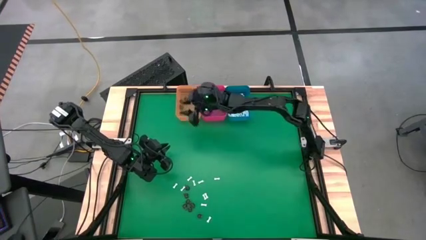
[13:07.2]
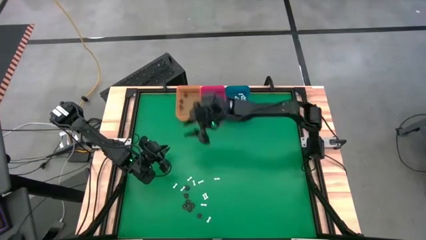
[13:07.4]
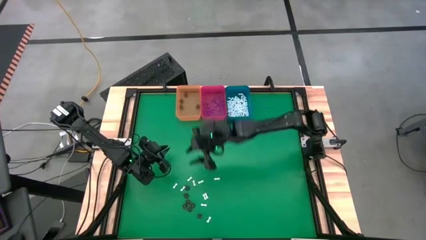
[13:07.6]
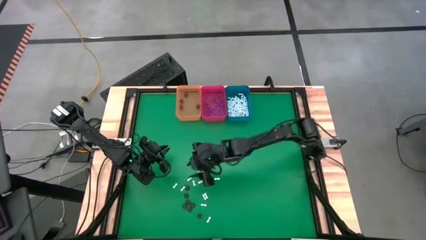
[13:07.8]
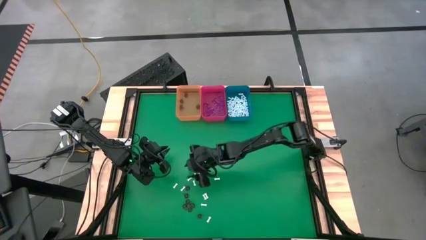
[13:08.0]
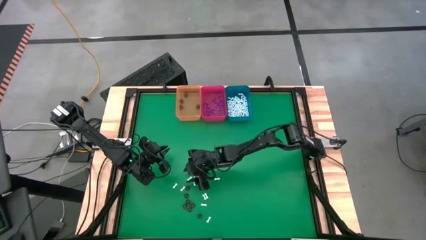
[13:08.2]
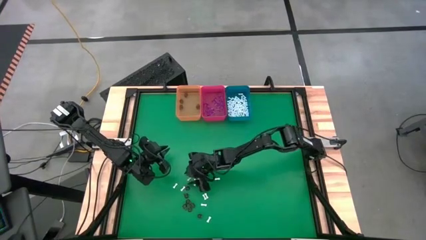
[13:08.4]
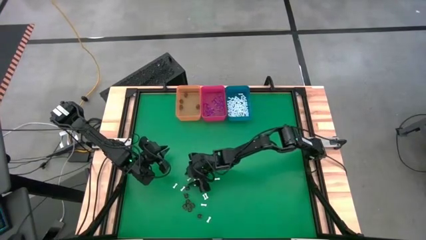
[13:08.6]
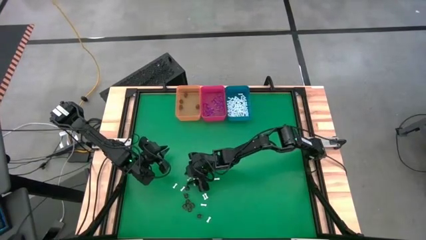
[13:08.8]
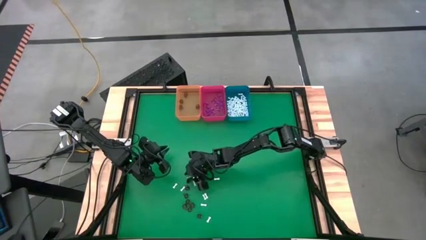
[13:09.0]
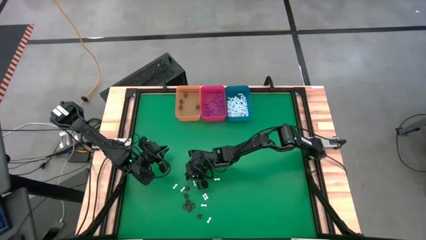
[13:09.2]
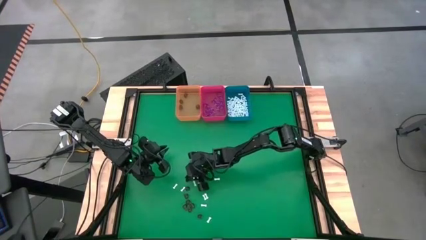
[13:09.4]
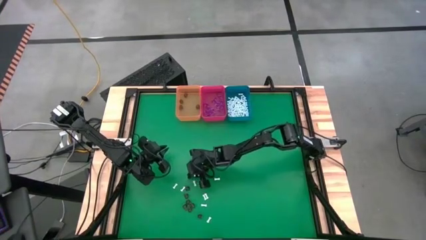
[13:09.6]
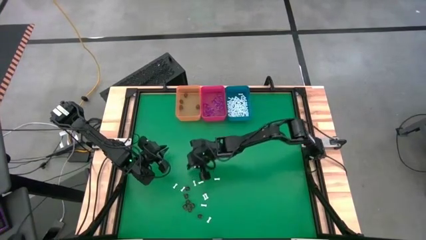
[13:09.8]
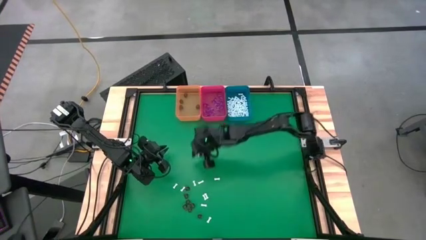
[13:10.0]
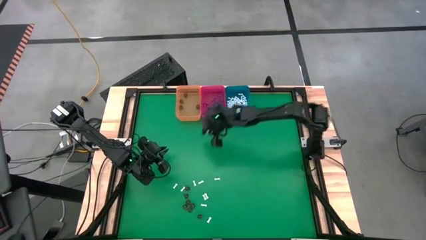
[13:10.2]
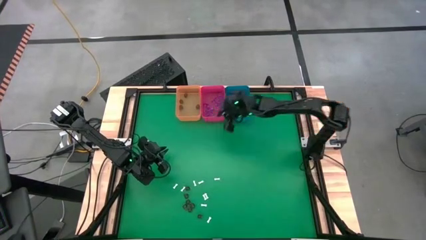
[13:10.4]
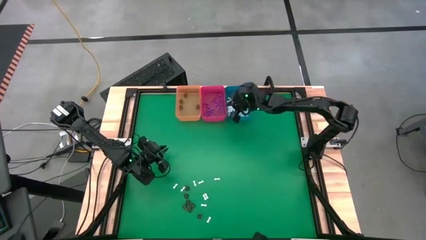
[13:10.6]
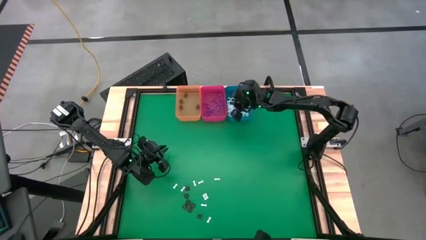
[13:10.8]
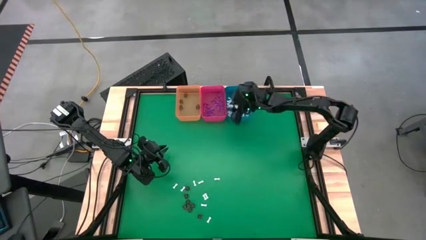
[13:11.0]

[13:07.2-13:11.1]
Task: Sort Halloween decoration
Put the white bone toy into the blue bin

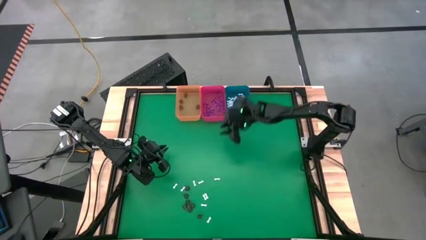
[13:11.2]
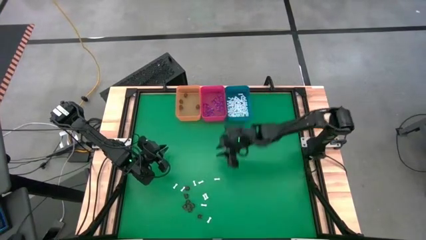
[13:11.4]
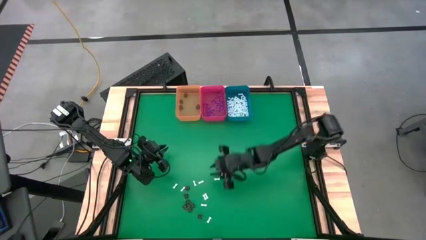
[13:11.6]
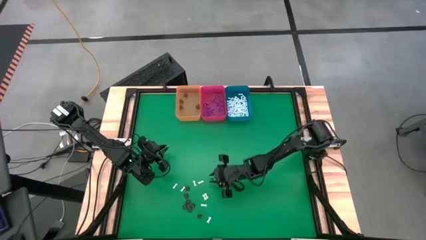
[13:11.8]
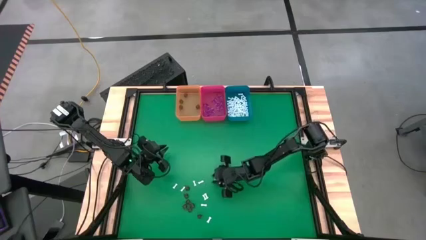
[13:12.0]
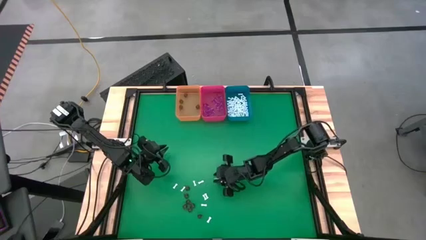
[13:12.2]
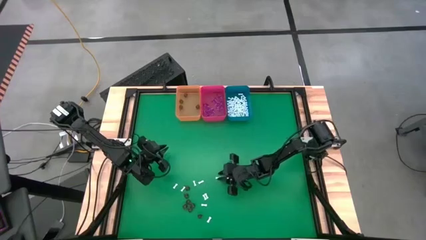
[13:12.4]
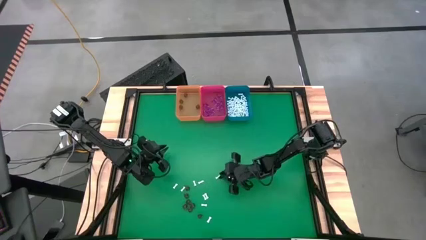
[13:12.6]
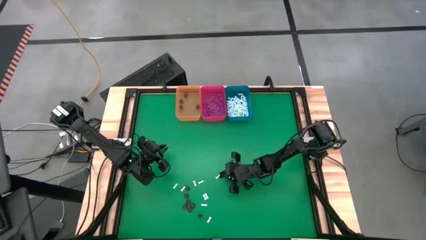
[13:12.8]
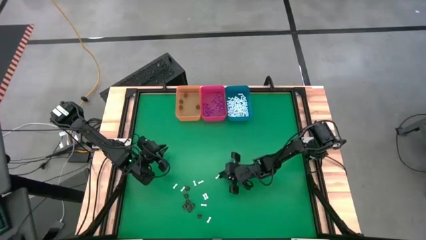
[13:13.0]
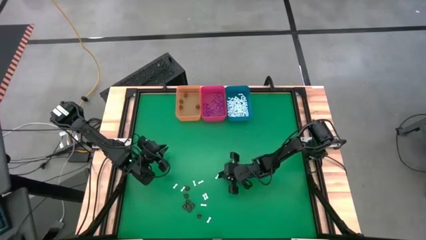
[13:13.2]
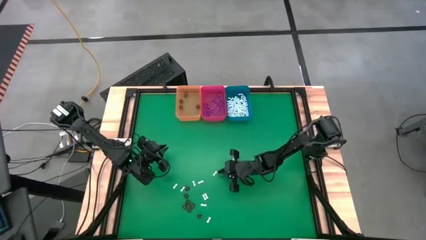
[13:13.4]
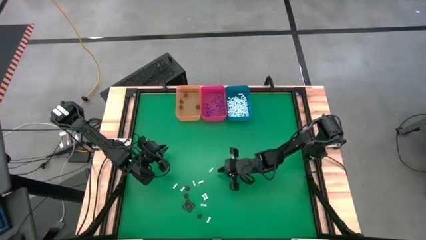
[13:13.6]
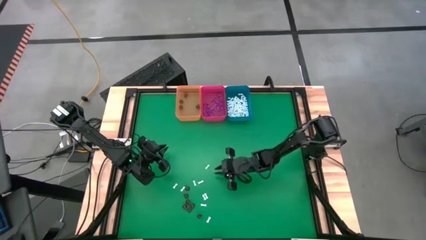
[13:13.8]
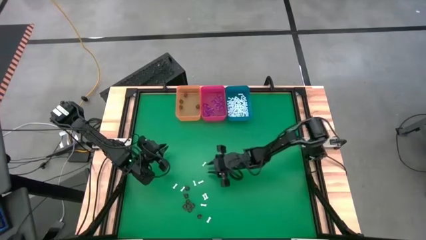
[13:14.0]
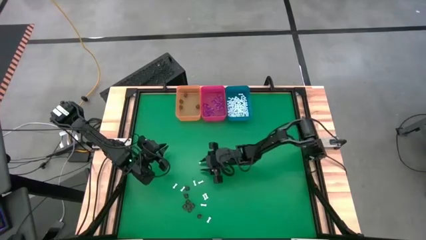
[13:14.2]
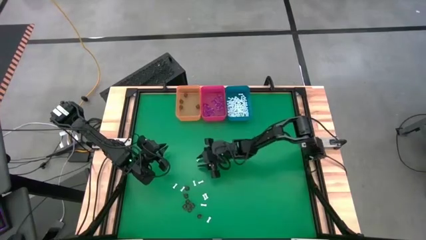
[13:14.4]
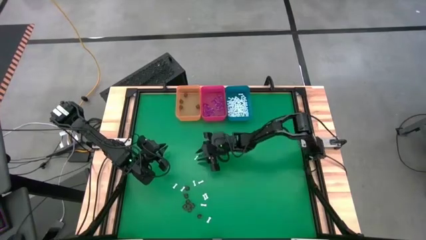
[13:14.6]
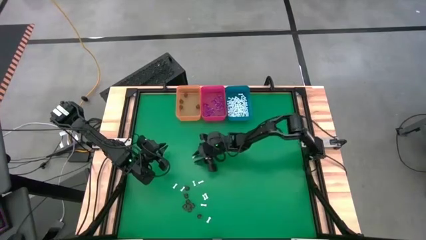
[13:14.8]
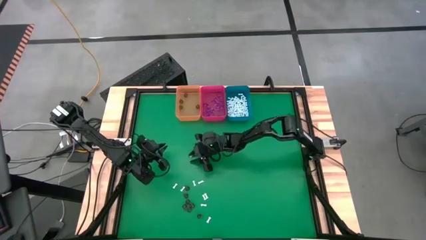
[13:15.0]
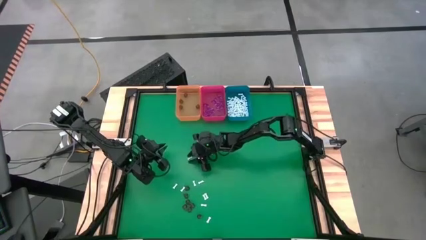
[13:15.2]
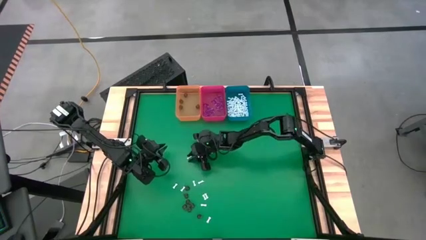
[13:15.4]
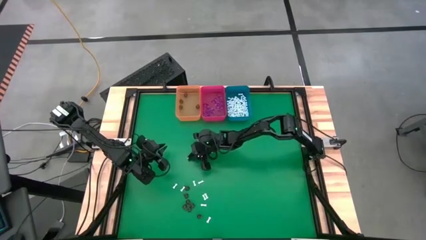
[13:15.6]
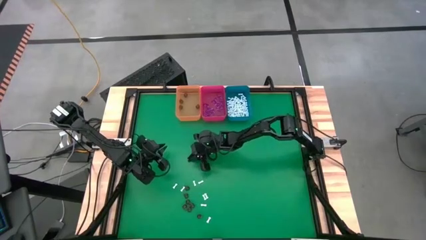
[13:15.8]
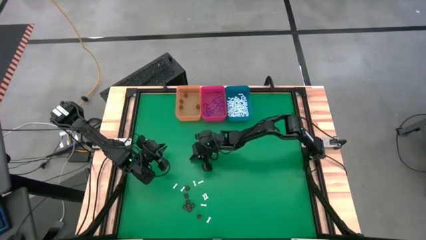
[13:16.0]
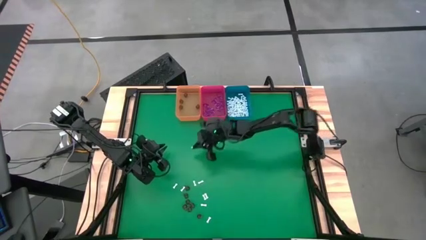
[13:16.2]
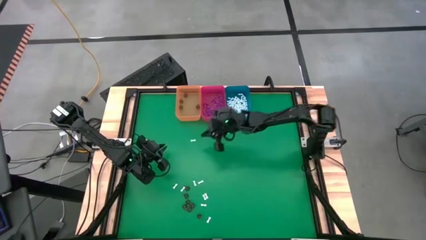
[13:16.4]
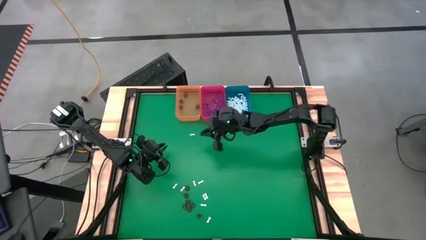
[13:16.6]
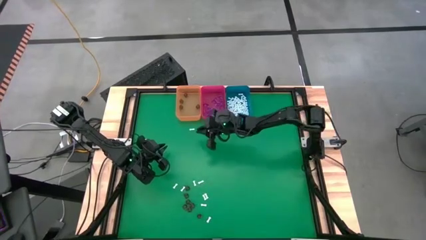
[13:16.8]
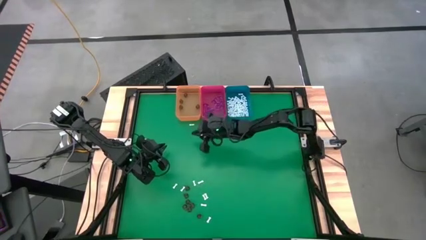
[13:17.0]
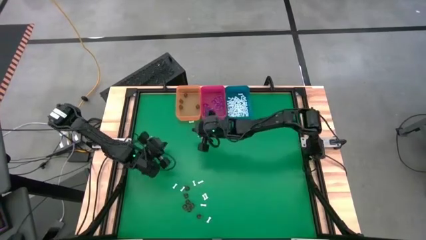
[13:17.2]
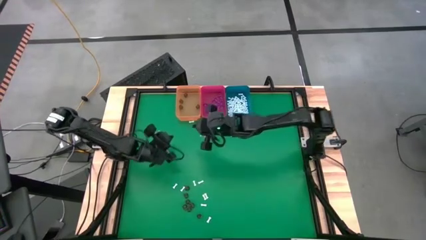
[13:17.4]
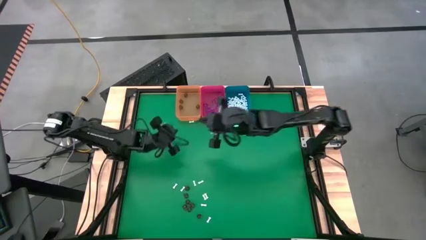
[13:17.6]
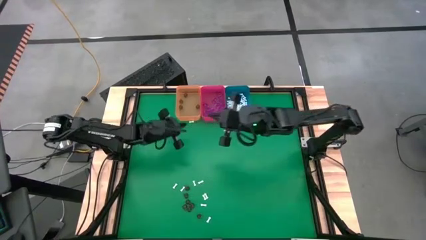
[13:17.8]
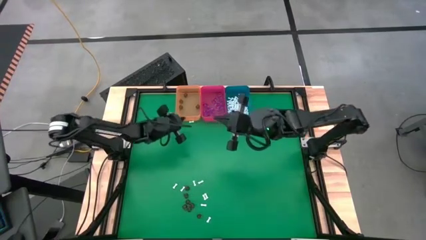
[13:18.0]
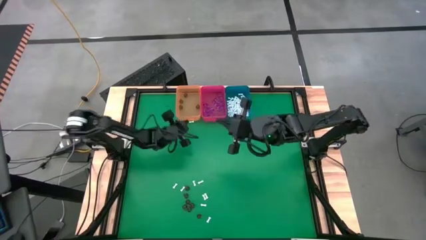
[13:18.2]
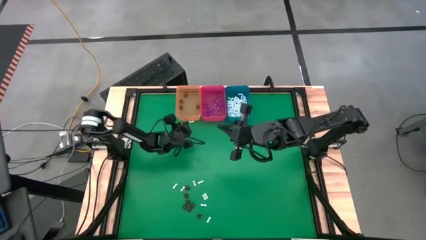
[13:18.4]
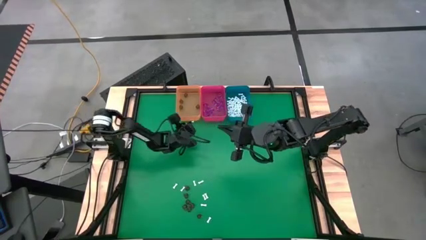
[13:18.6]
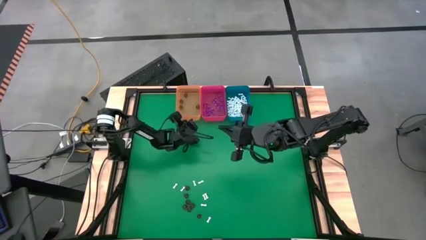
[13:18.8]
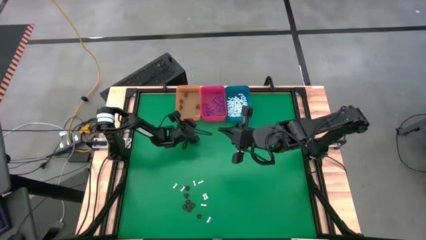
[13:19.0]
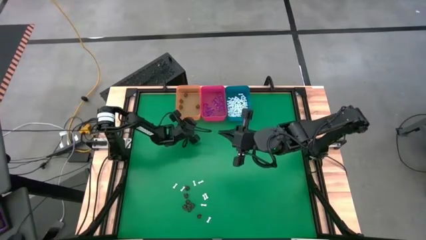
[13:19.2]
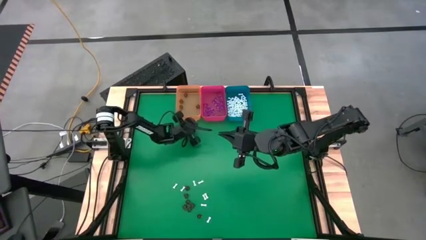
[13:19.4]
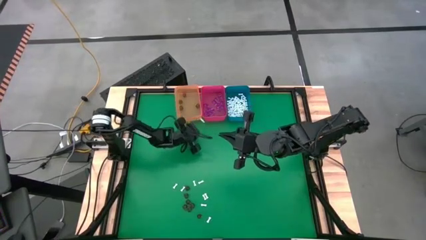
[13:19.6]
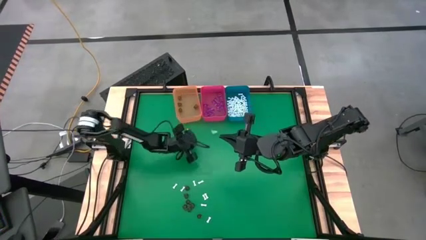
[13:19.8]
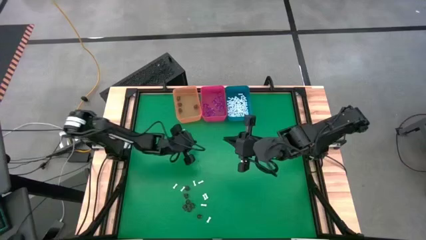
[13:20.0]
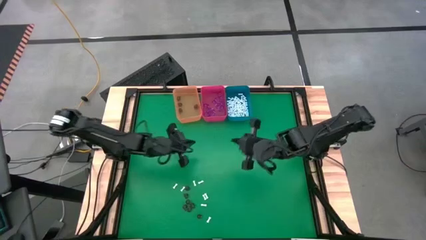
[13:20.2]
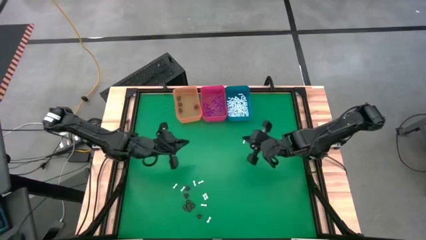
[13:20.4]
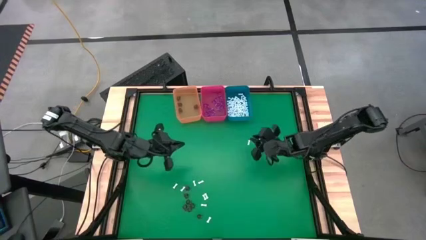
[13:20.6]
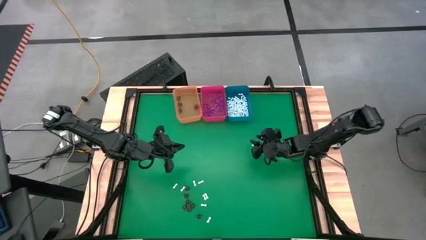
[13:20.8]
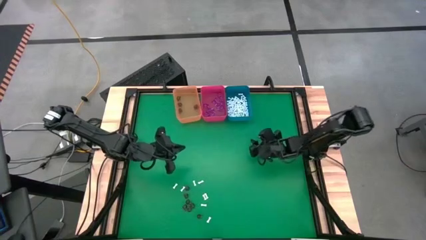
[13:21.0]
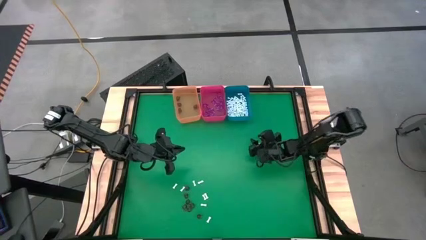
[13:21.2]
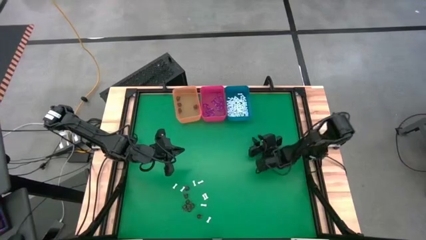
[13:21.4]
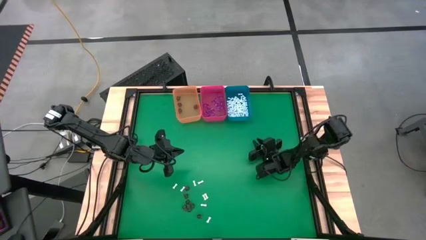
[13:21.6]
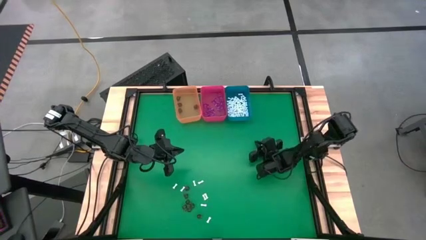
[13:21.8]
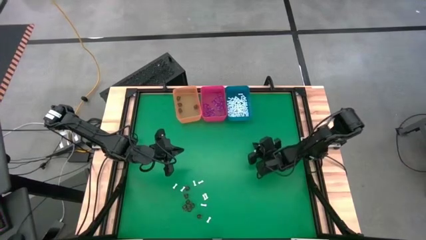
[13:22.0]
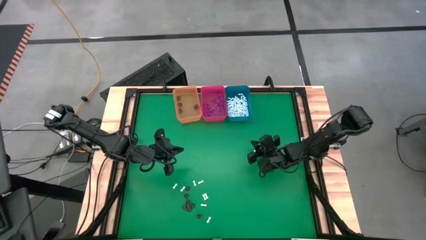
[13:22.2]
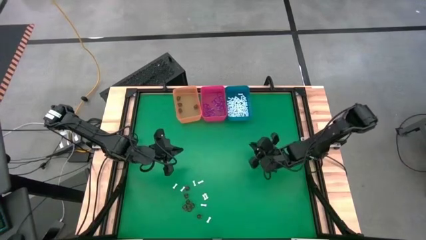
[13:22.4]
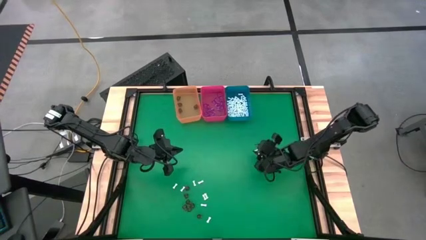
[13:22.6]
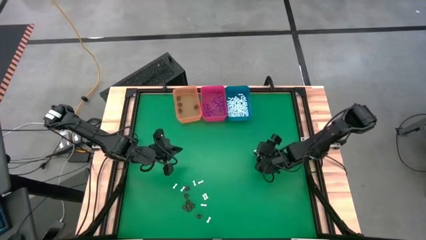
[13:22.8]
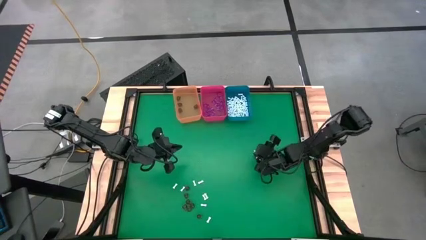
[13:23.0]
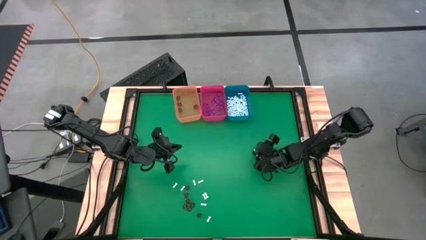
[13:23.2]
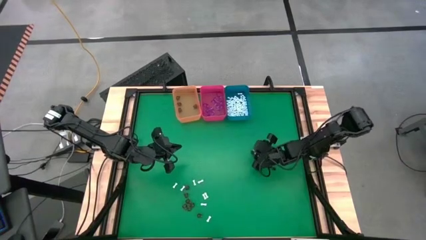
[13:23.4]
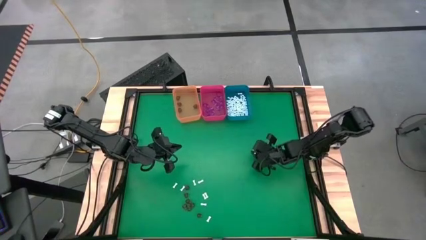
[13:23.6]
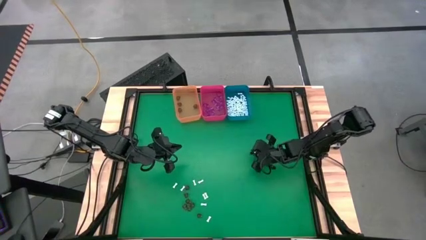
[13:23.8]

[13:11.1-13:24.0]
Put the white bone toy into the blue bin

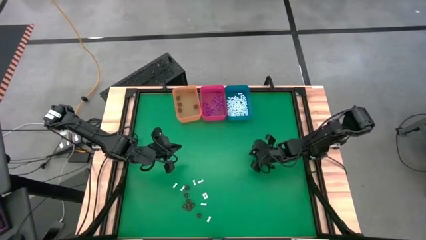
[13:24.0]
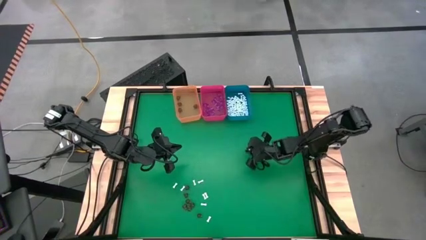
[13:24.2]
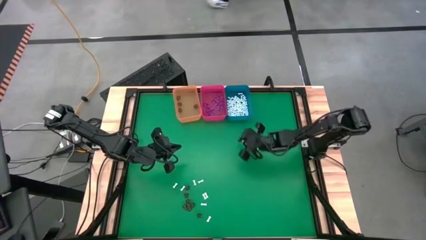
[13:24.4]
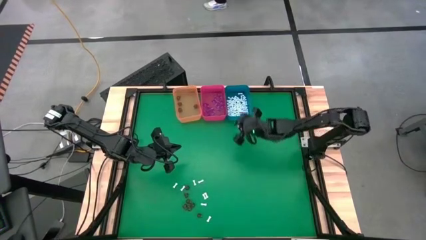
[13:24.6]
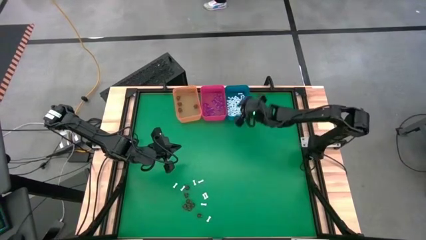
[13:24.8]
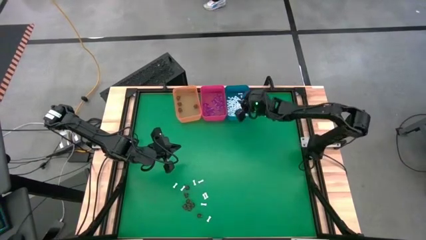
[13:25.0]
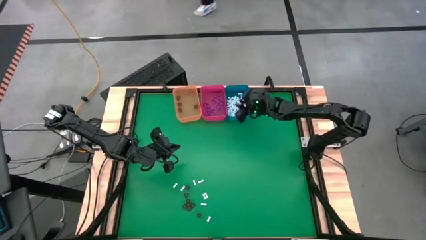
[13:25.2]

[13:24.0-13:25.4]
Put the white bone toy into the blue bin
